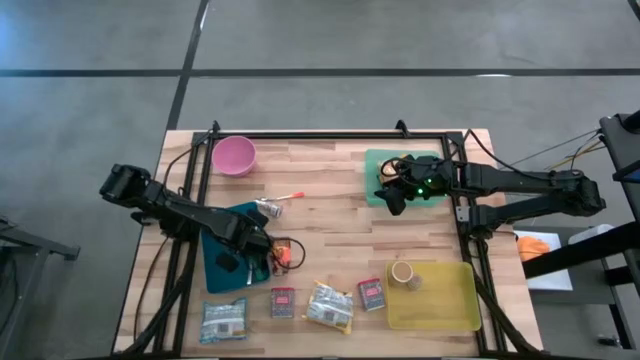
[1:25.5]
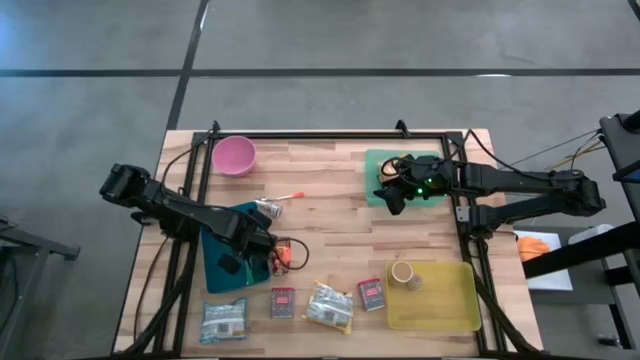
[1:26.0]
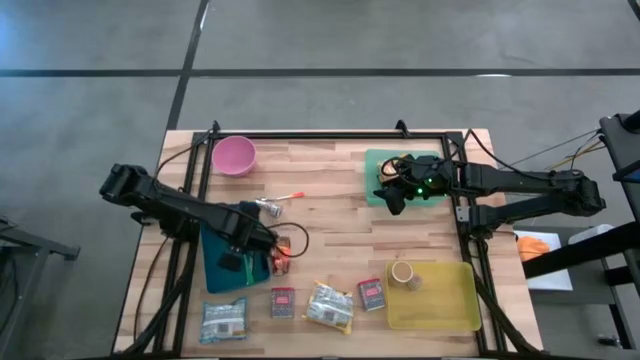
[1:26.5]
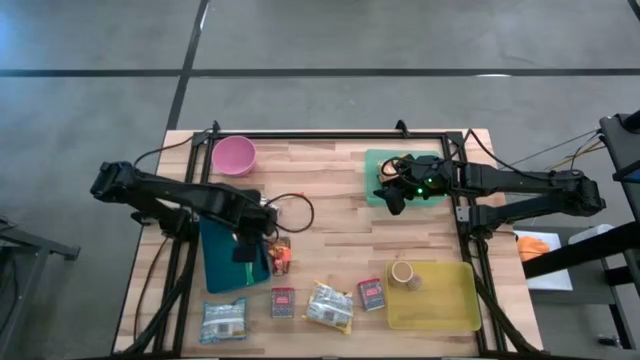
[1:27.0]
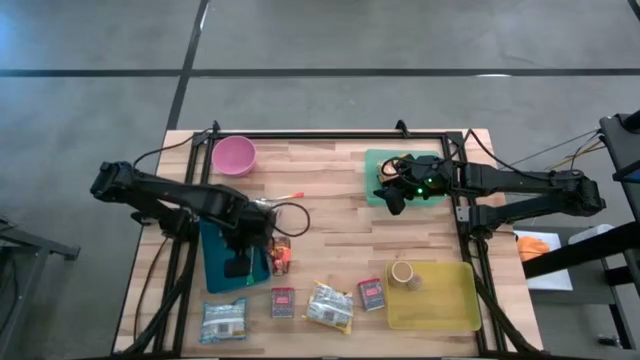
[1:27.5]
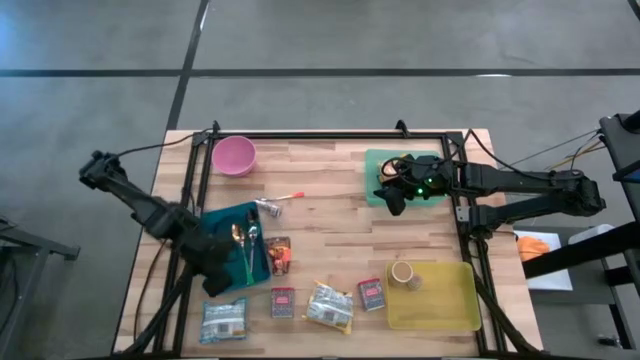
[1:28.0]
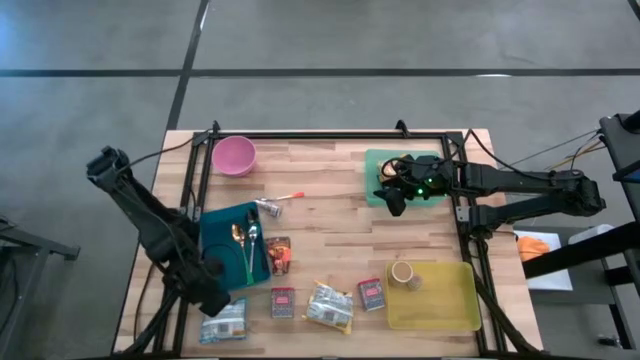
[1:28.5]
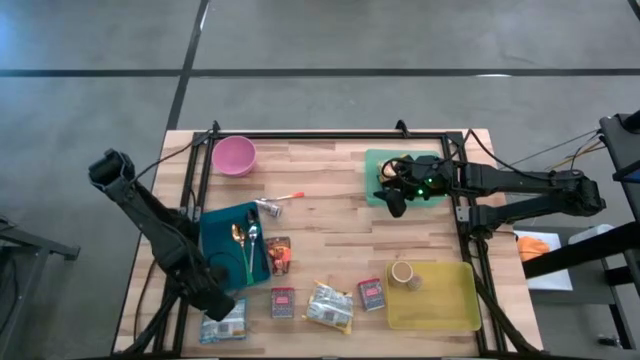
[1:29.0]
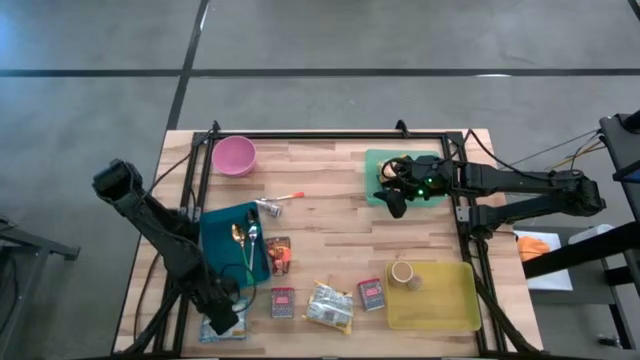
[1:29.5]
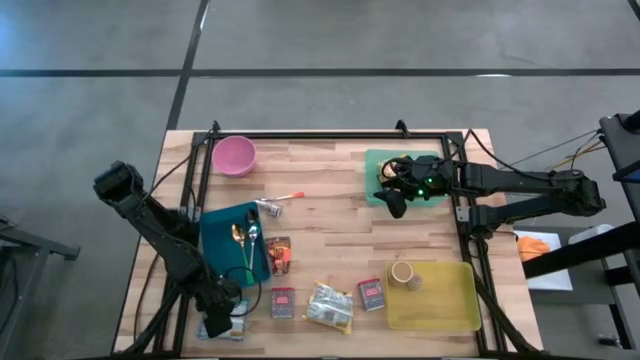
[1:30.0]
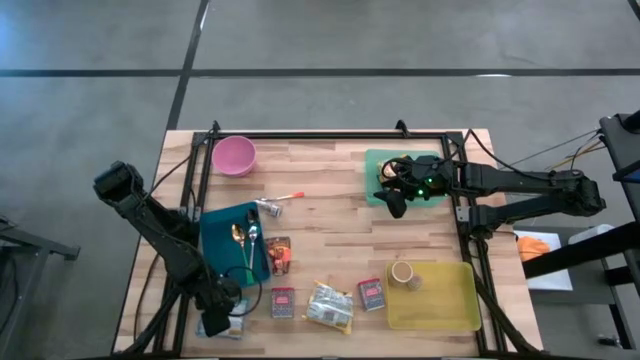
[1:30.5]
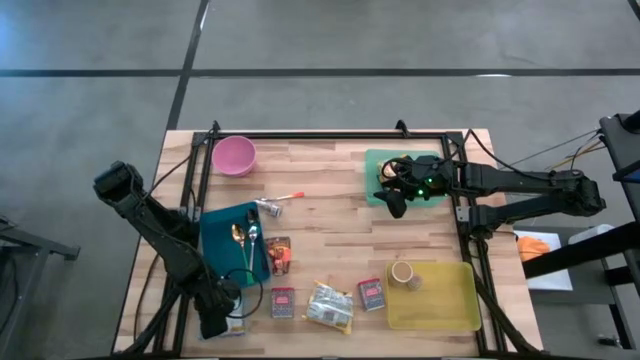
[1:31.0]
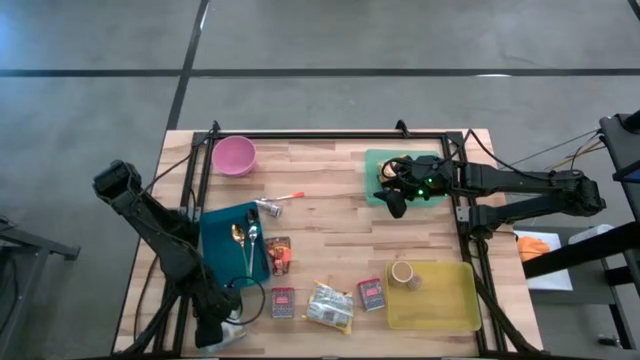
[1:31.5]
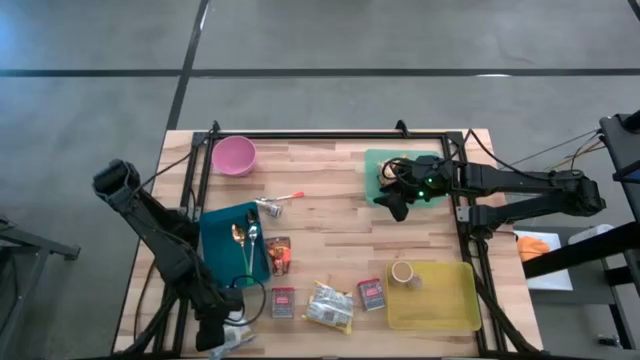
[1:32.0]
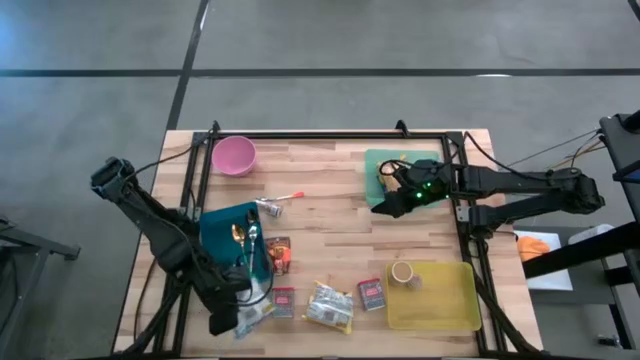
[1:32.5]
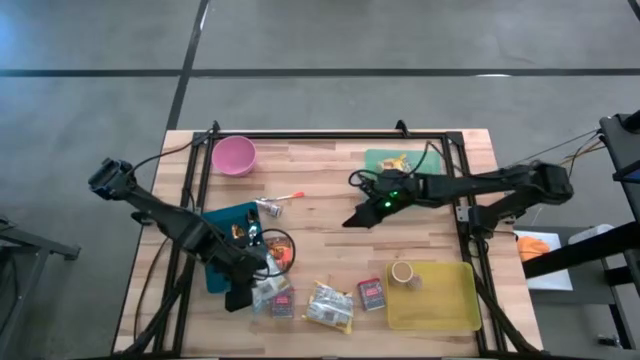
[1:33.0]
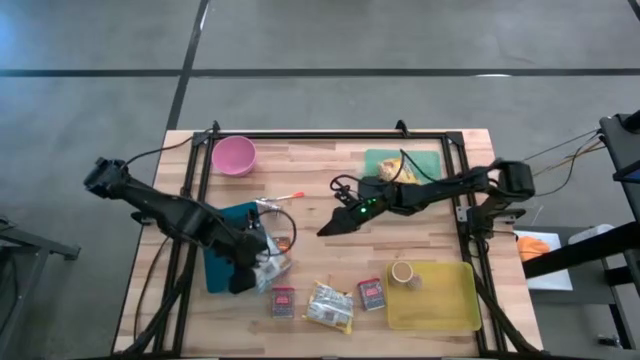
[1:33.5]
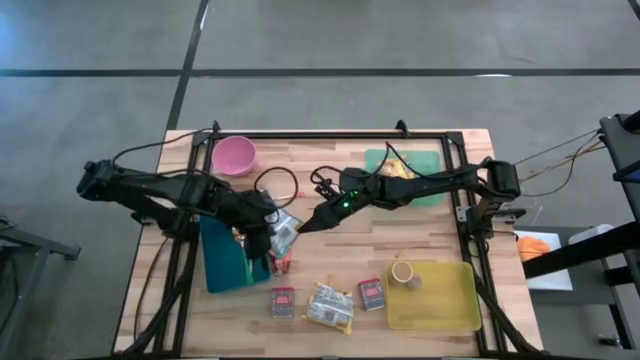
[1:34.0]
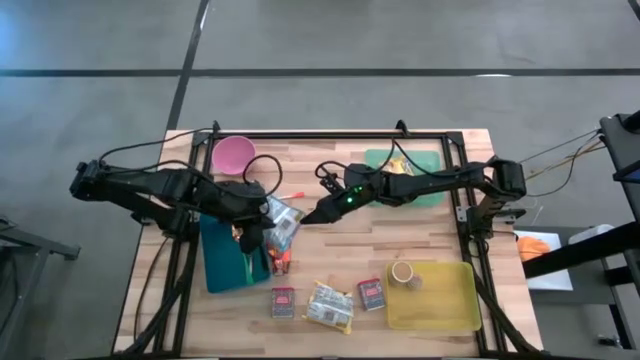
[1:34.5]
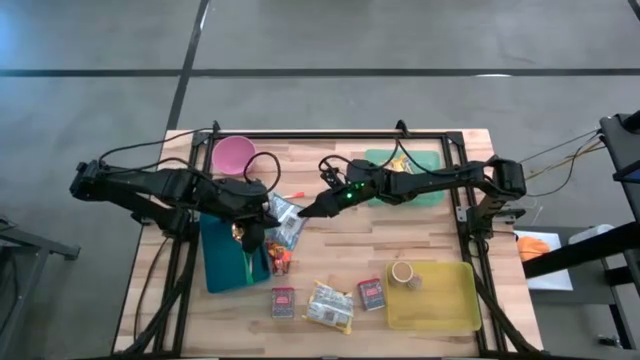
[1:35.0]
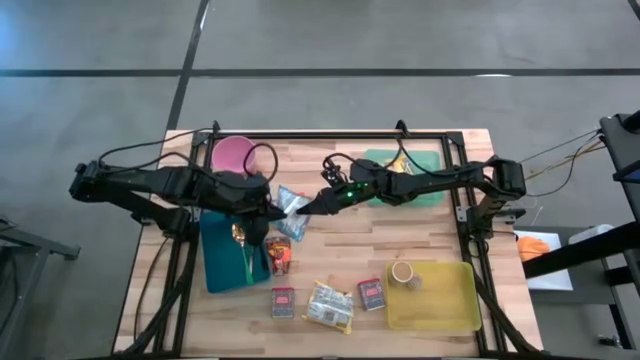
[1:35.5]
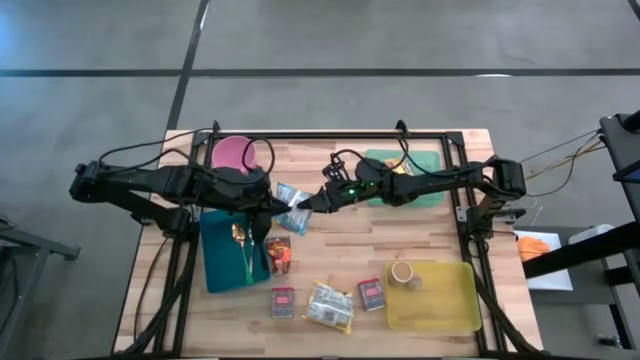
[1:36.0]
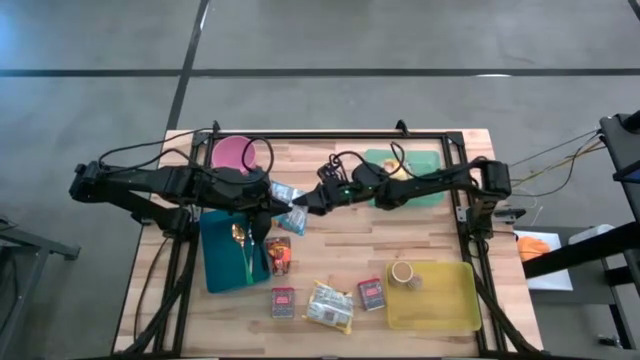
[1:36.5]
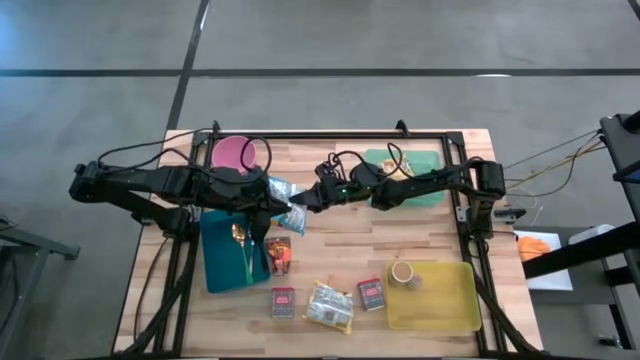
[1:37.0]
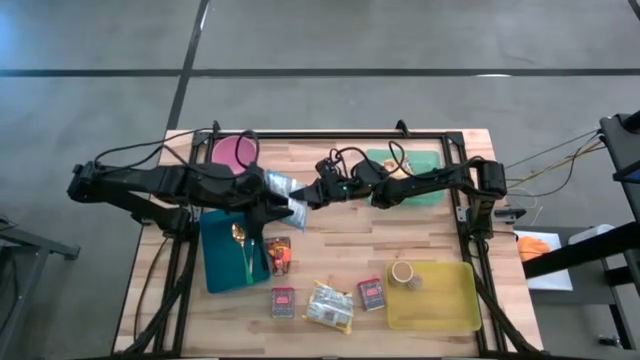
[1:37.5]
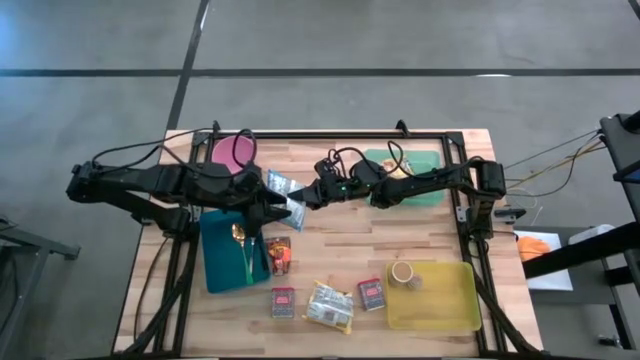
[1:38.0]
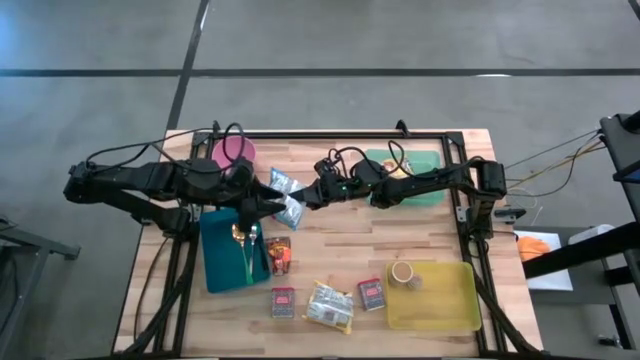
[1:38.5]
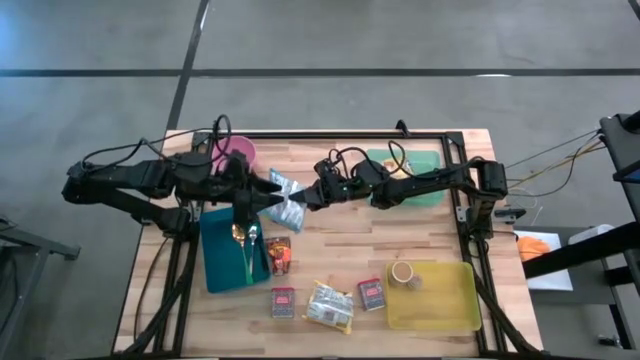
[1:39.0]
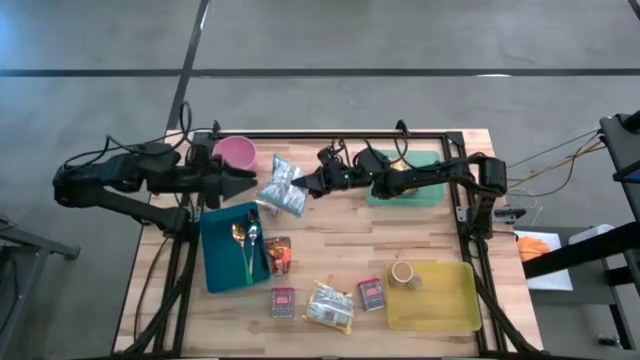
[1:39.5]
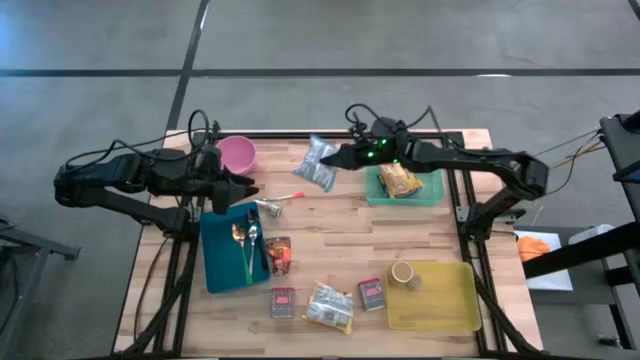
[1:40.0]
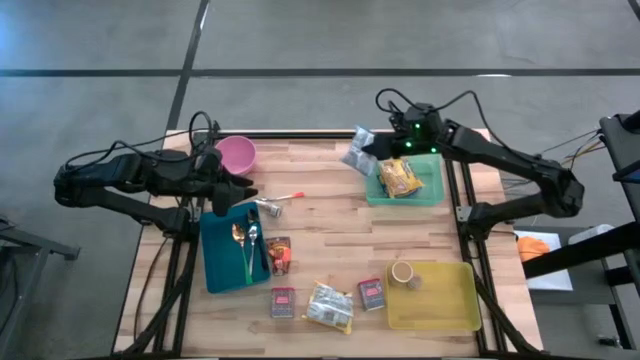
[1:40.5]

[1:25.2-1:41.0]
Put the light blue noodle pack into the green bin

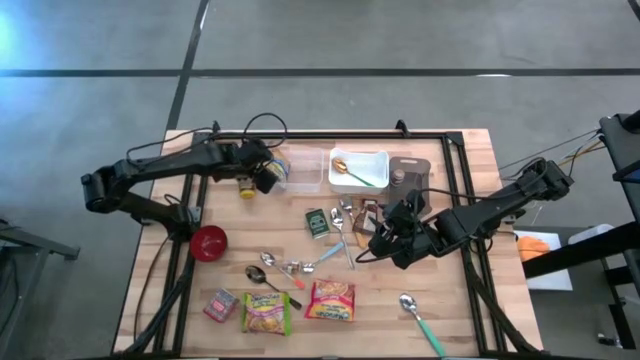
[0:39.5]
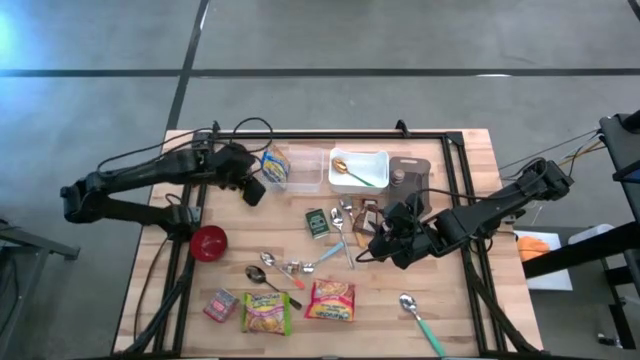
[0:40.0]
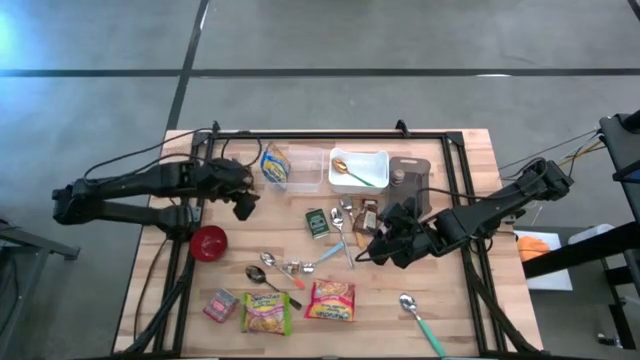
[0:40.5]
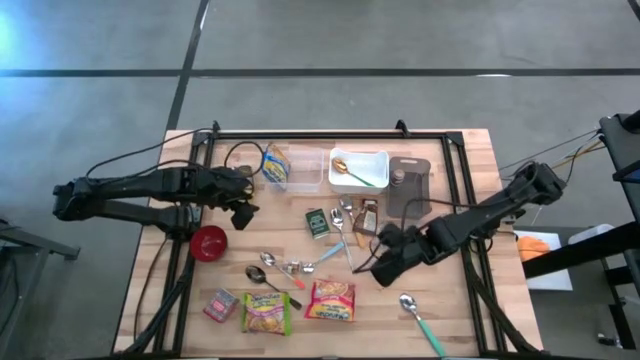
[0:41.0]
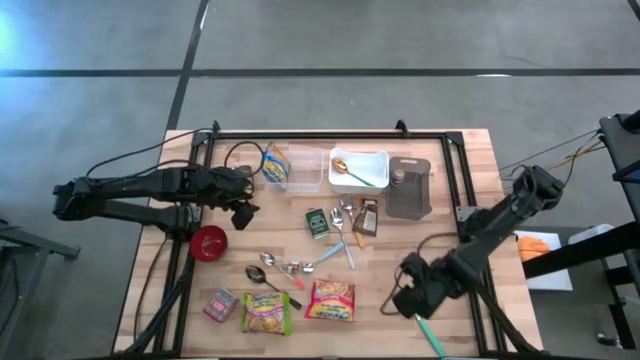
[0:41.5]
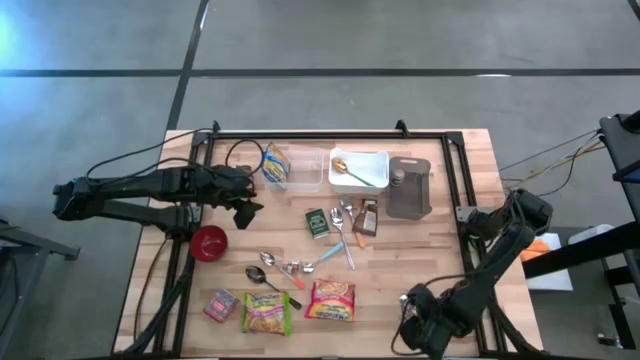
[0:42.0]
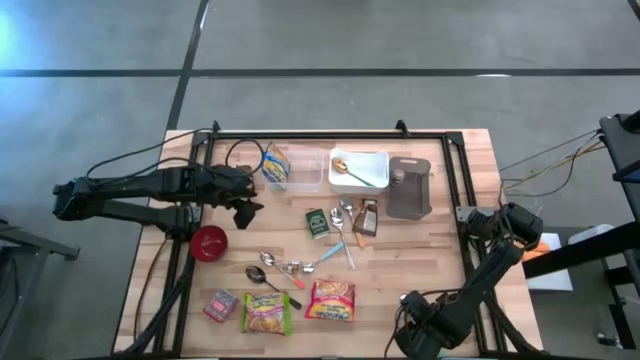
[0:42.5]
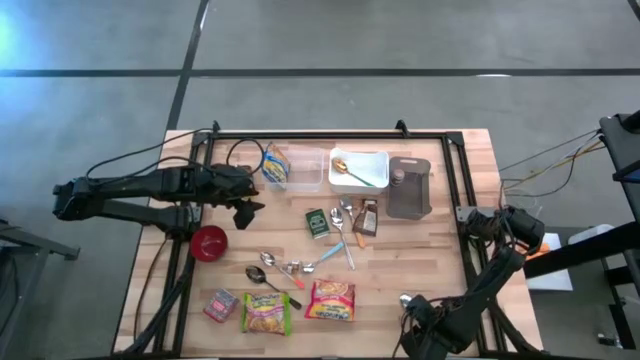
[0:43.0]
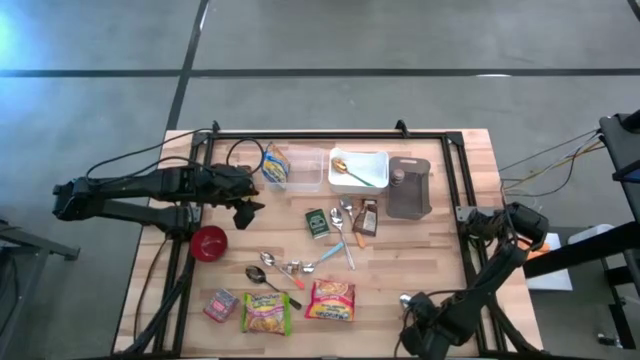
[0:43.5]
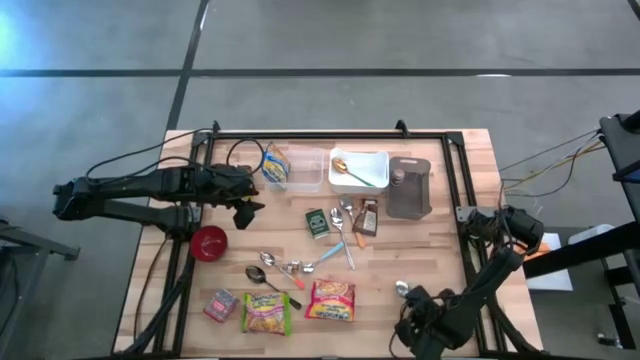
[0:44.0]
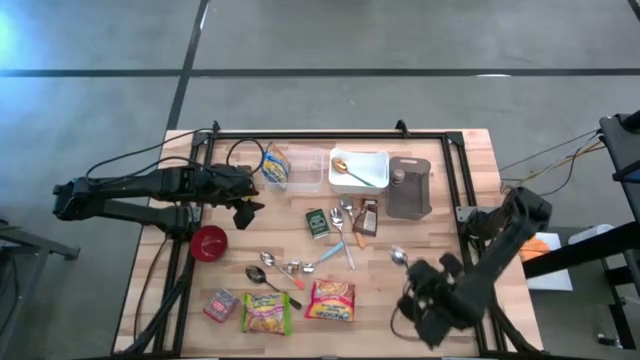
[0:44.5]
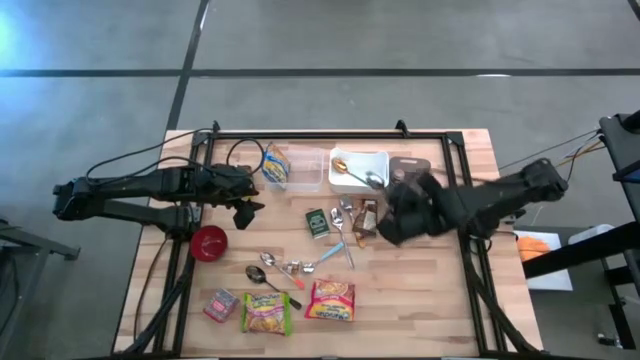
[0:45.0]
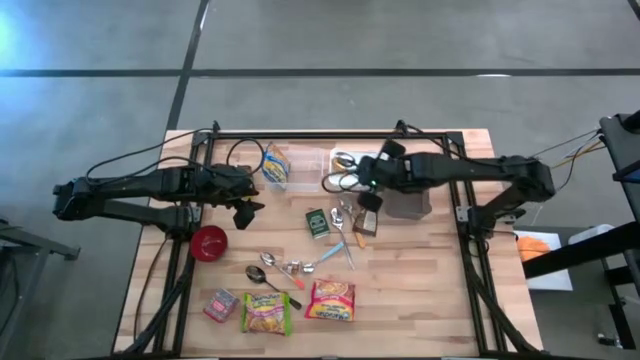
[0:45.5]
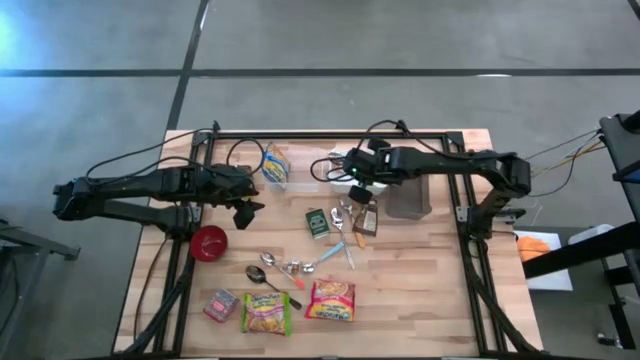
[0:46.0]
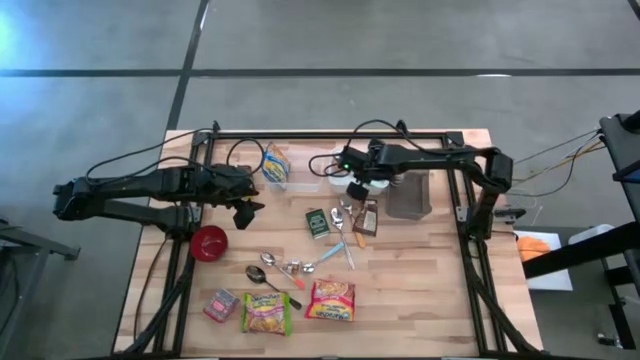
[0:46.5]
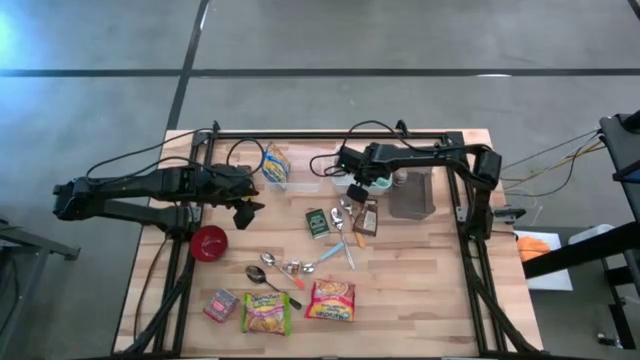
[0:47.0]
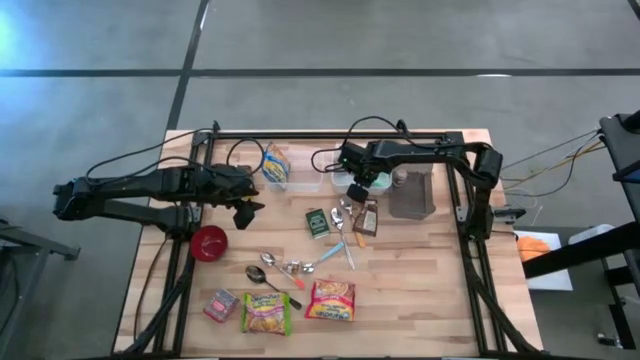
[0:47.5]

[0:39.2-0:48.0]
Put the light green spoon into the white bin
